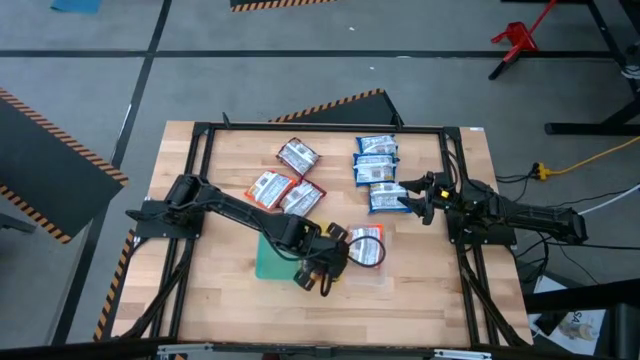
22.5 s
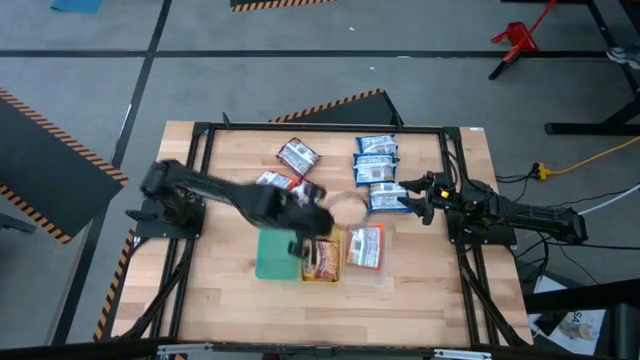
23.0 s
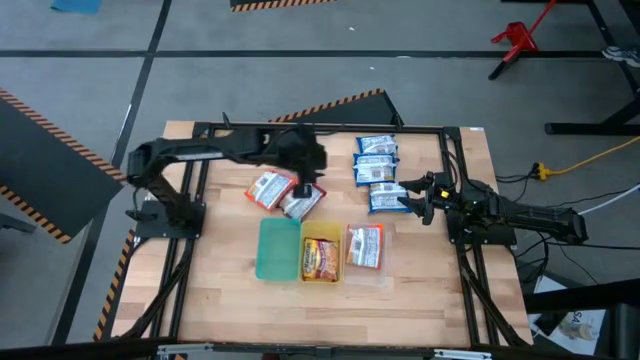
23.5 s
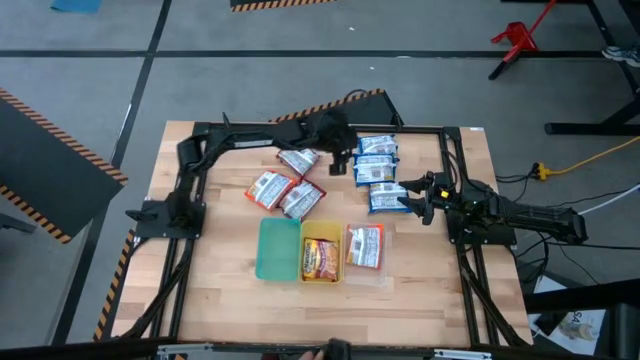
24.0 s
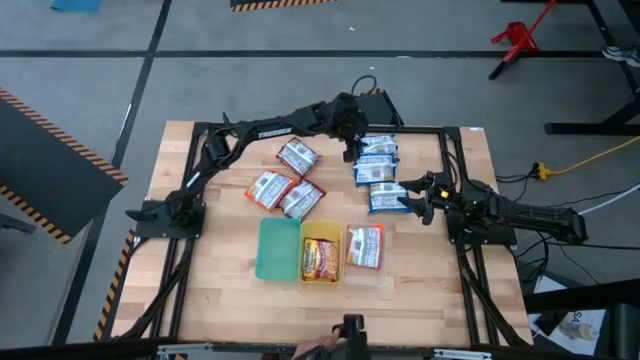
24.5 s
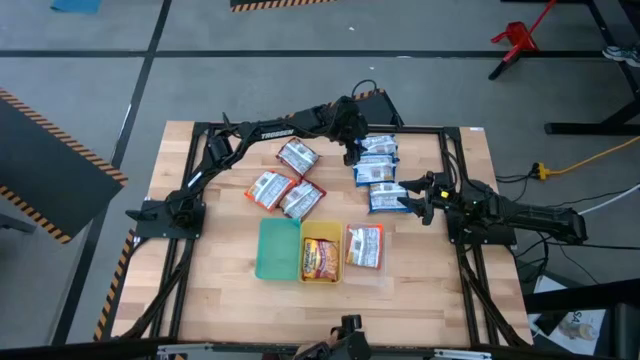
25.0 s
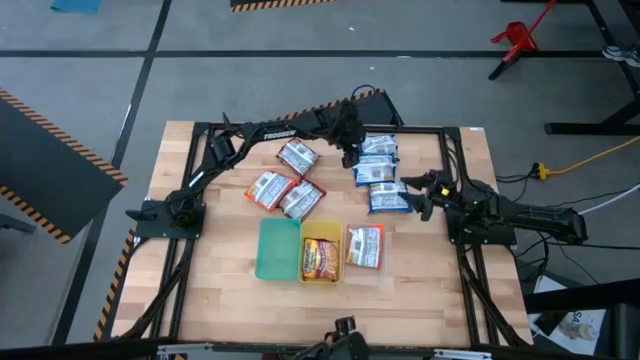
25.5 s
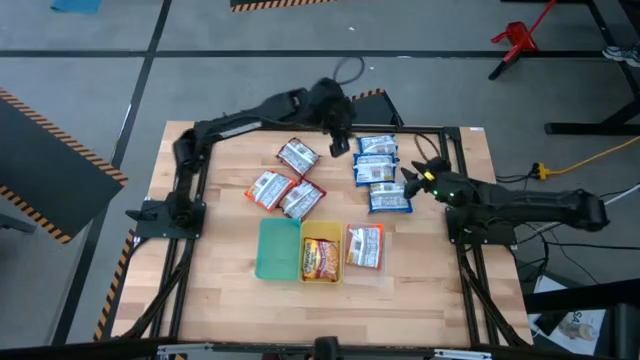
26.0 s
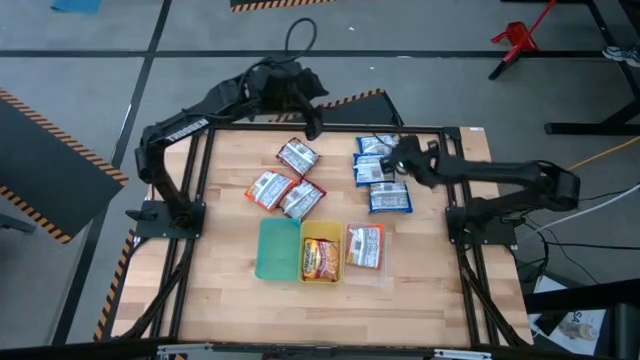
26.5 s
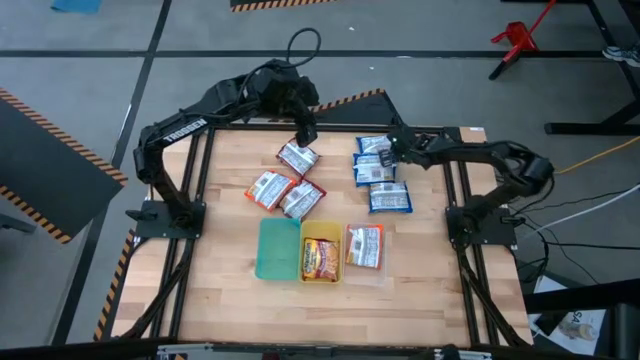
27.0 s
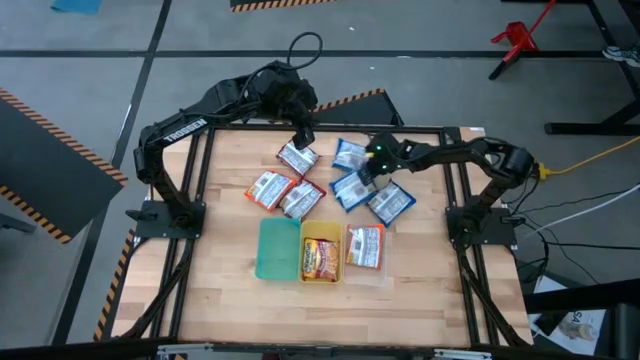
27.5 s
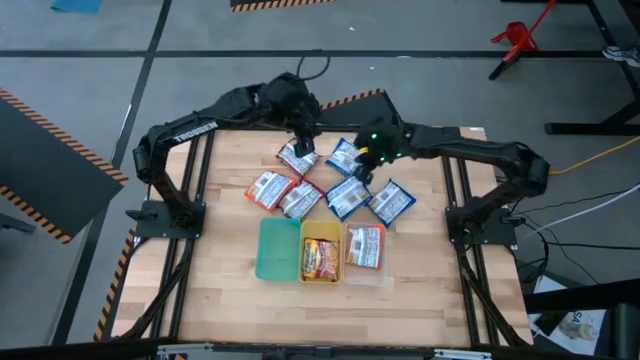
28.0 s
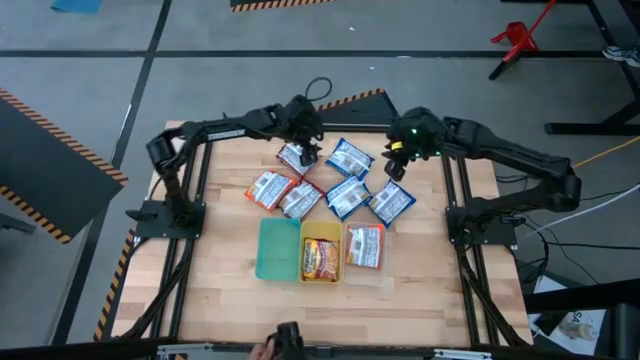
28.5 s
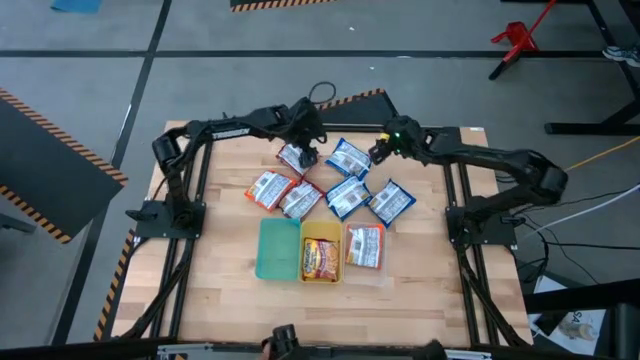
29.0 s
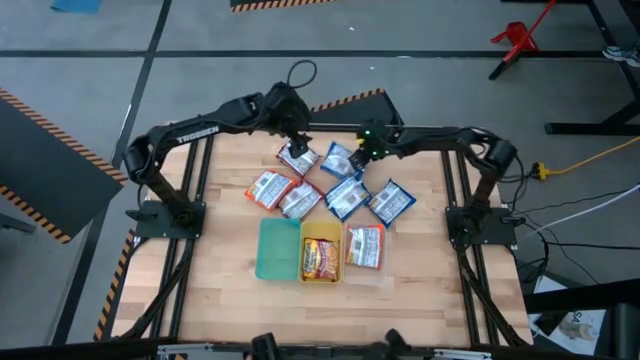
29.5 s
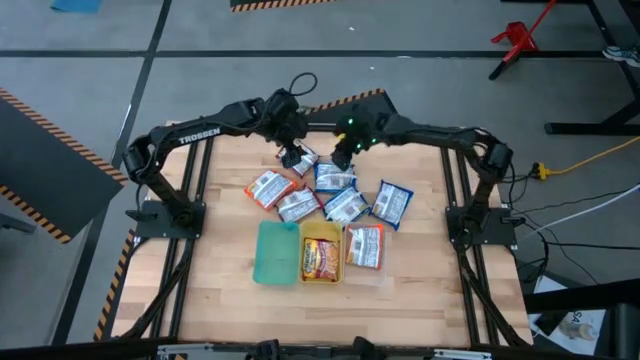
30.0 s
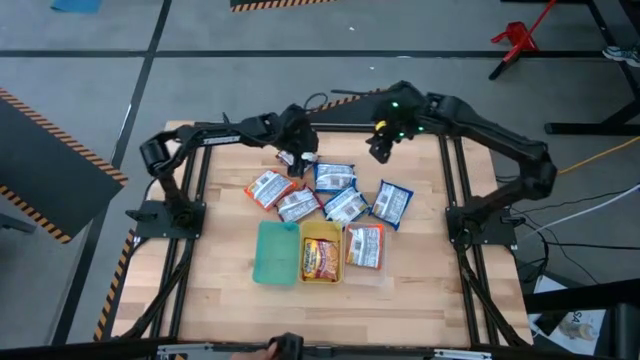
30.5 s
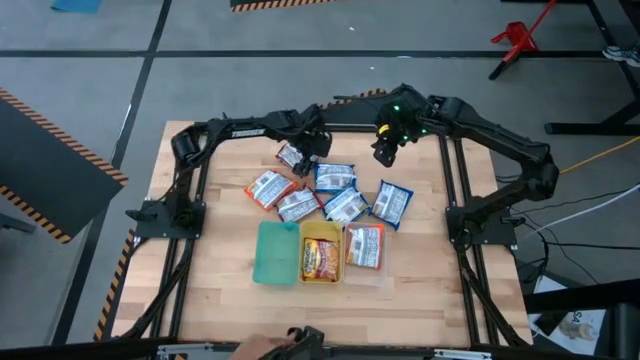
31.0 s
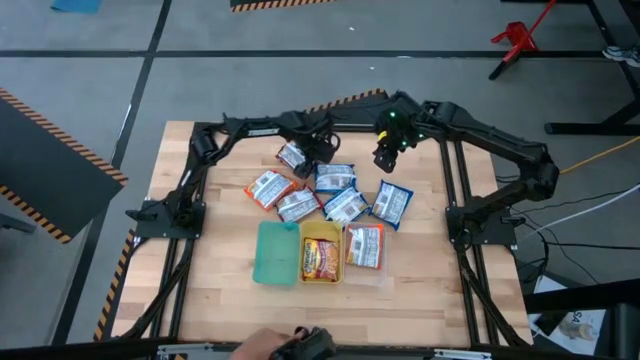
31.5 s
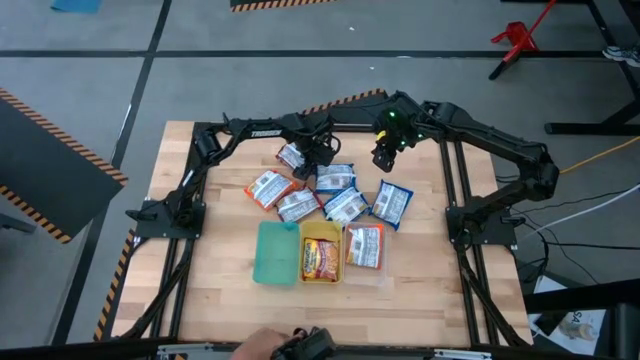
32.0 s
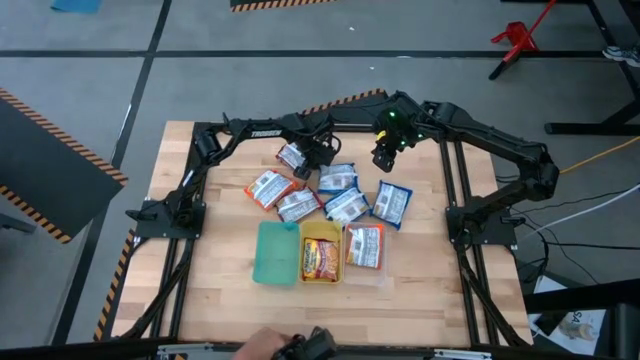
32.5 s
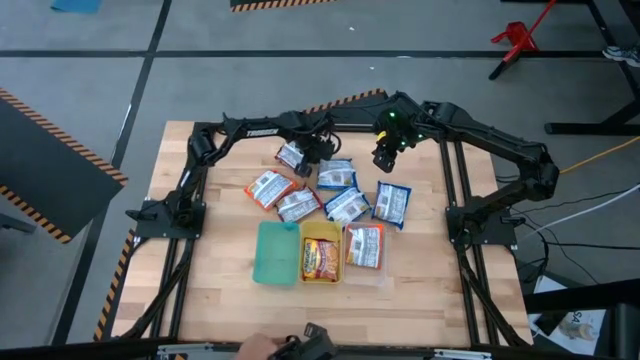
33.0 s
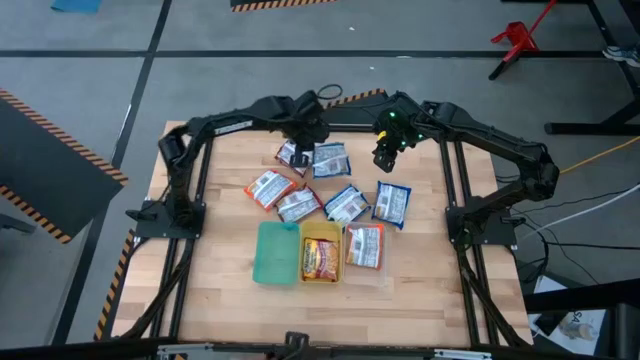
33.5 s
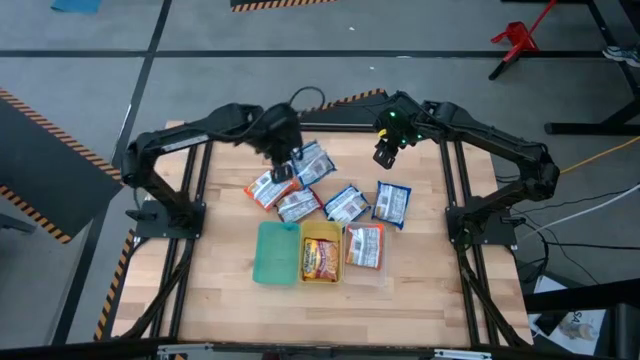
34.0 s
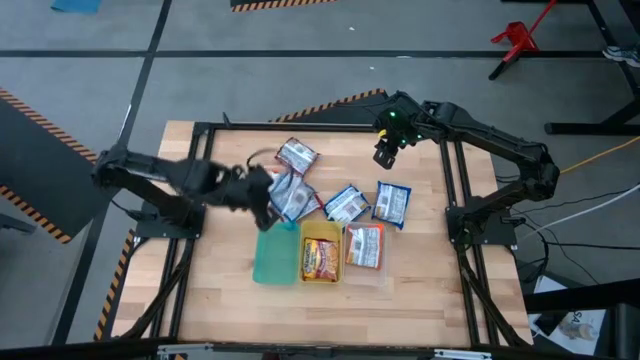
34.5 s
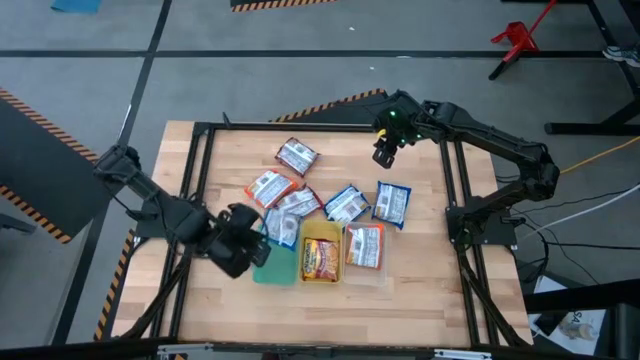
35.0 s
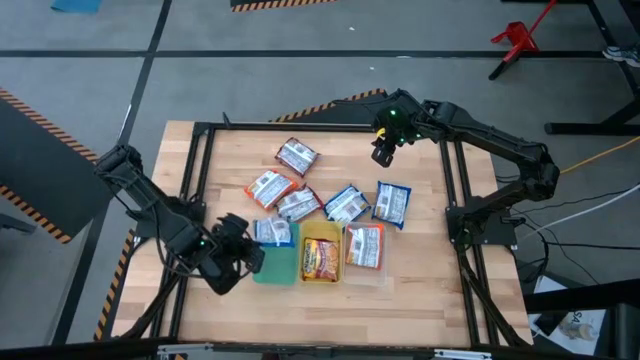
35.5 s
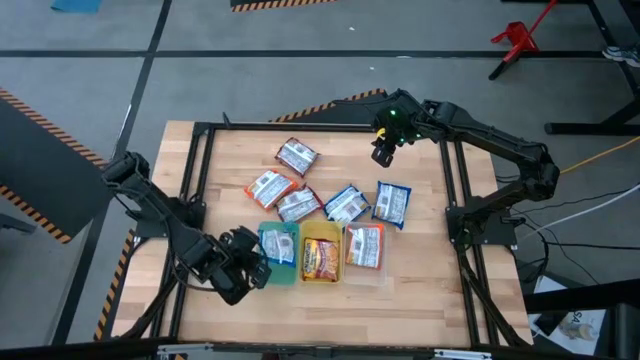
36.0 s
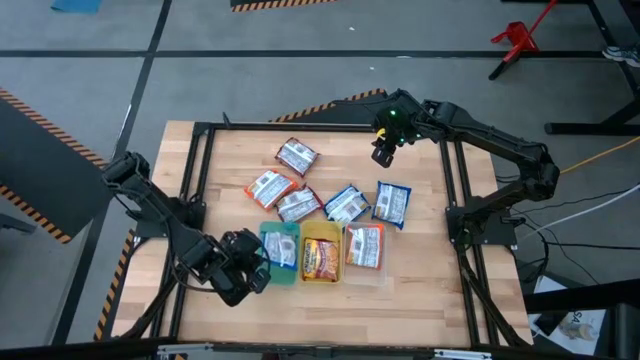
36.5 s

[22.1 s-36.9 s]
Task: Sort Maruchan noodles
Put the top blue noodle pack into the green bin

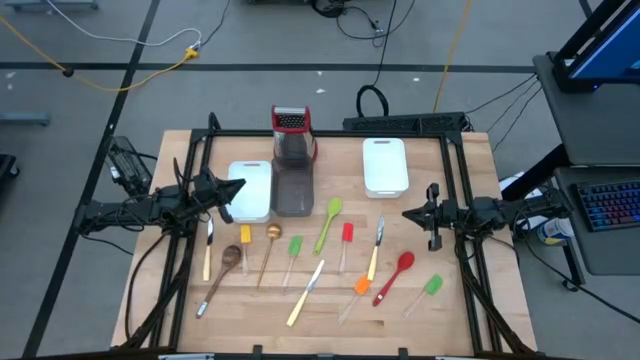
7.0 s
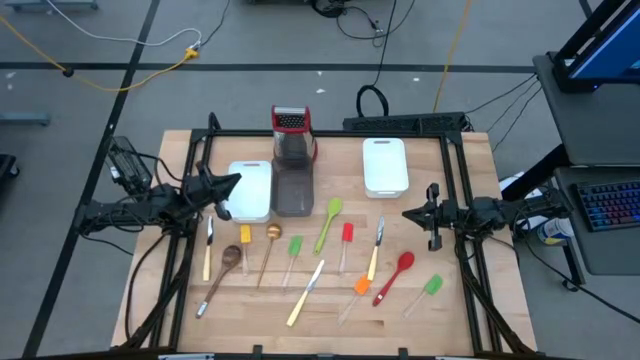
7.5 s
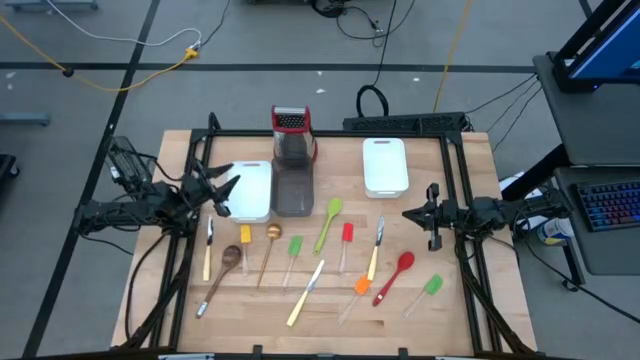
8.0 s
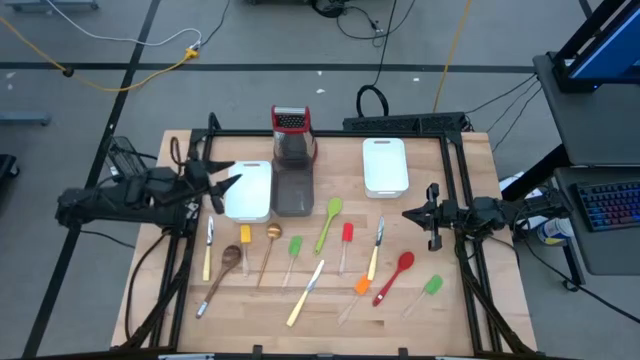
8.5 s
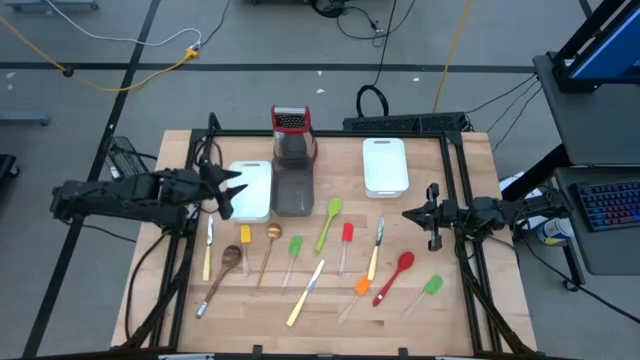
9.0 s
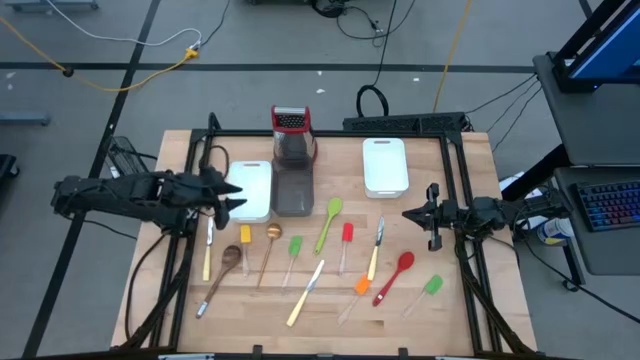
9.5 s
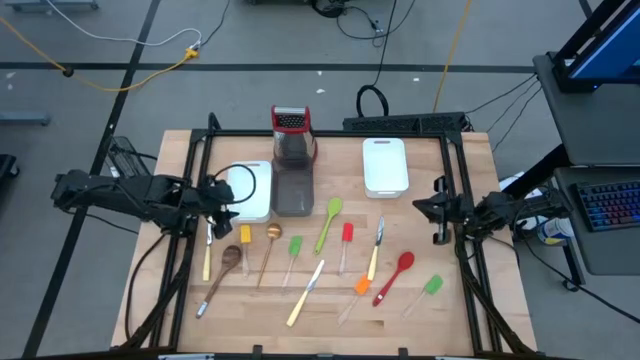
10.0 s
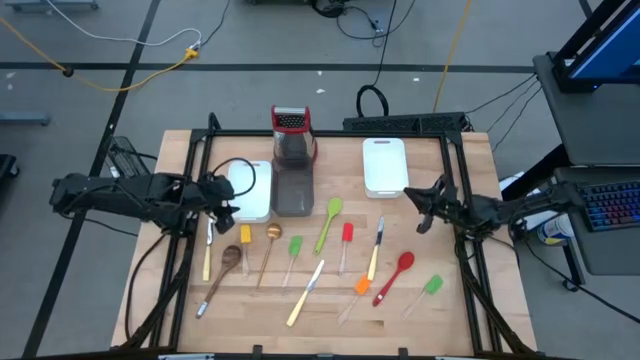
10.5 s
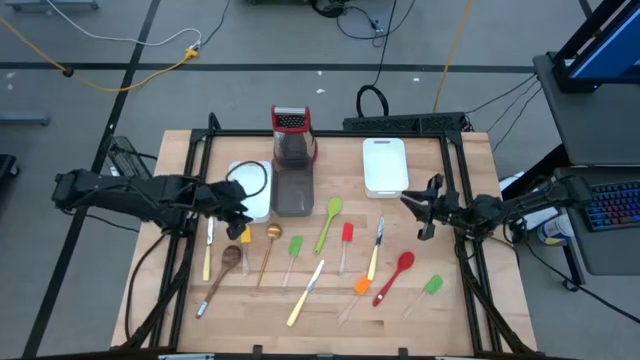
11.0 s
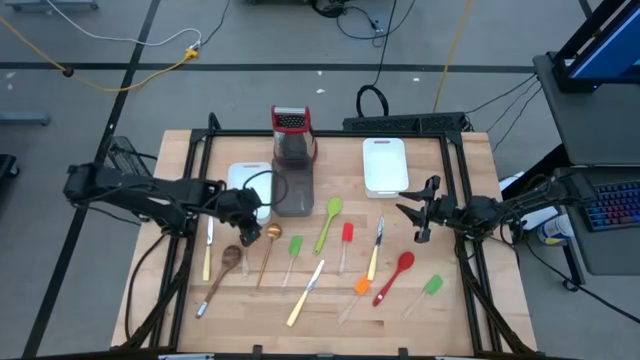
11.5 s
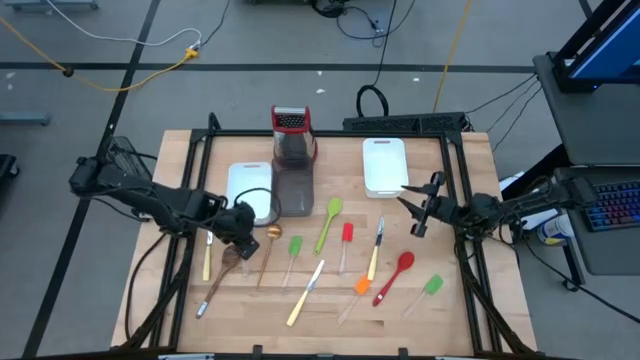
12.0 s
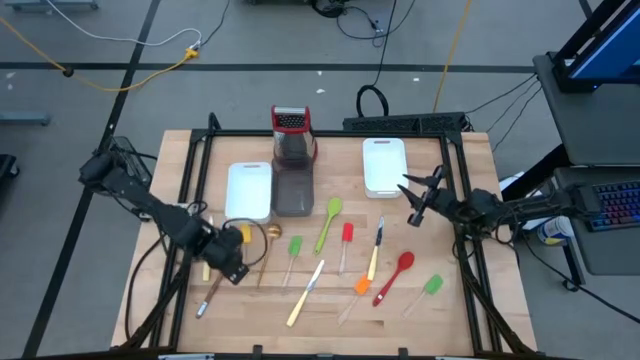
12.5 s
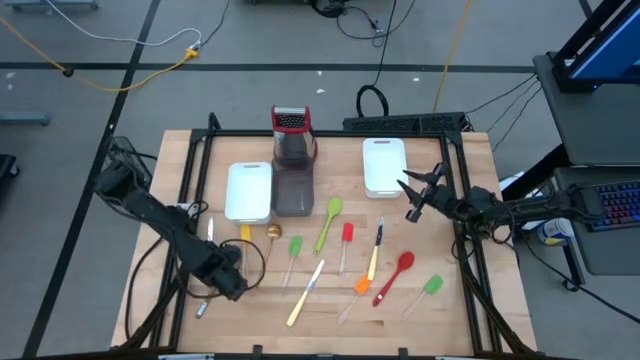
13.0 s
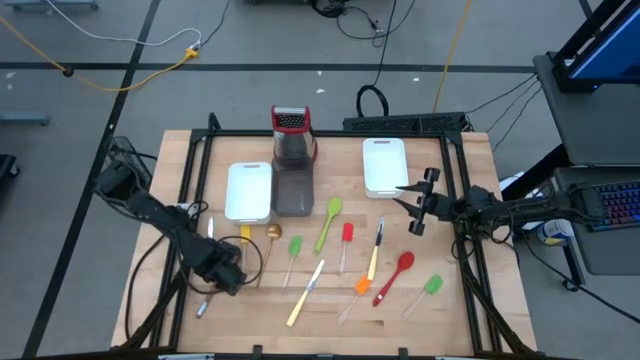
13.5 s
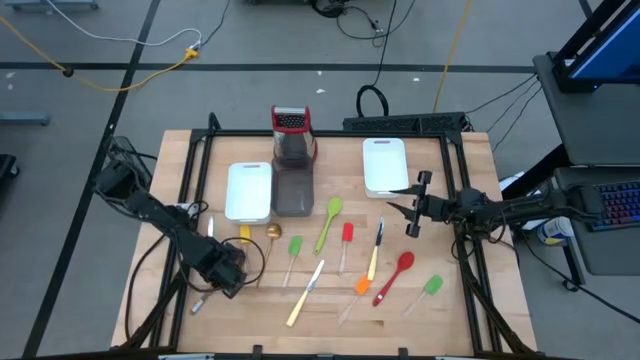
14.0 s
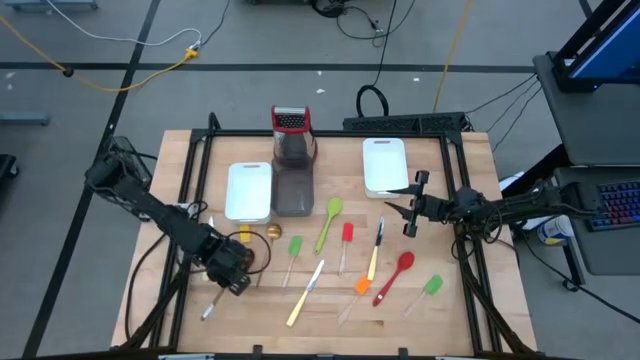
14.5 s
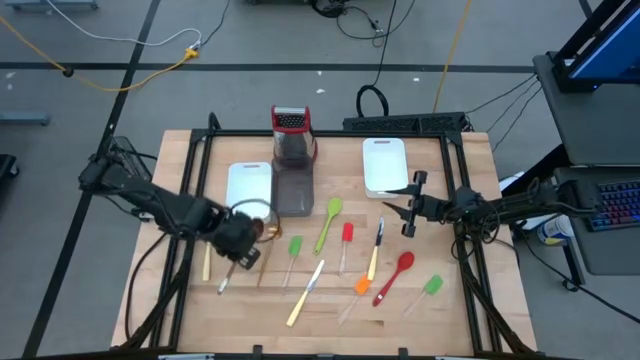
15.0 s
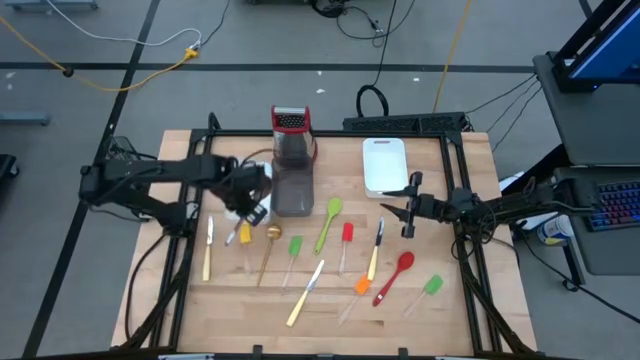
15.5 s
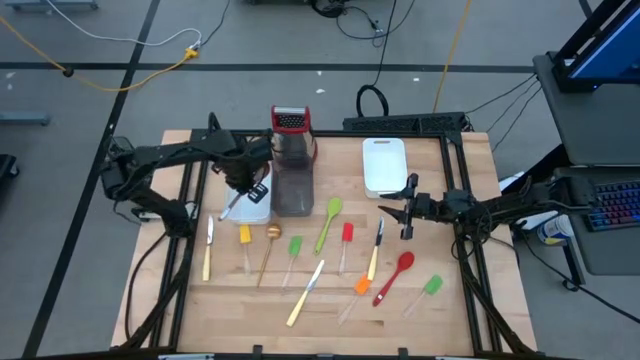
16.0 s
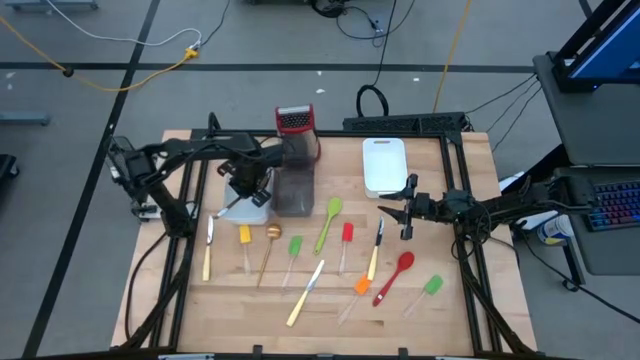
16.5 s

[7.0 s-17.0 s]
Task: Pick & Place Kitchen Items
Put the brown serving spoon into the left white bin
